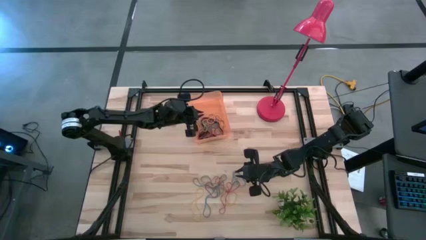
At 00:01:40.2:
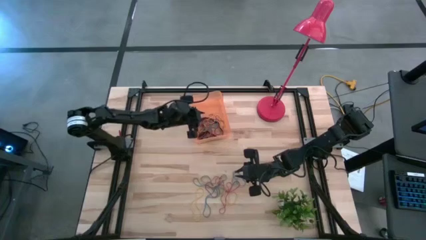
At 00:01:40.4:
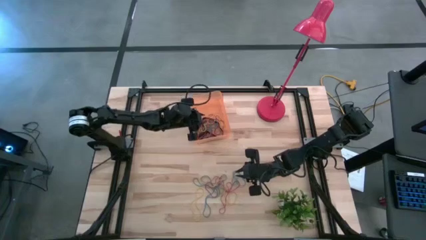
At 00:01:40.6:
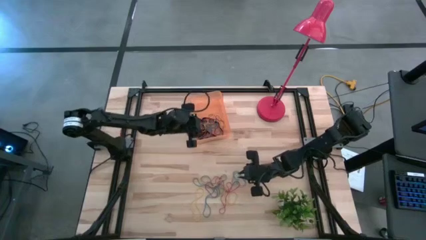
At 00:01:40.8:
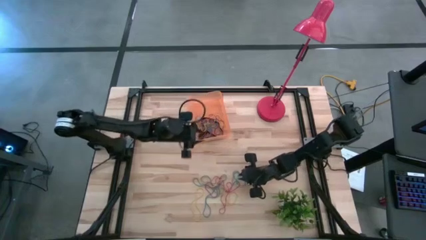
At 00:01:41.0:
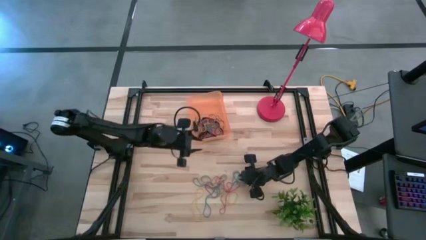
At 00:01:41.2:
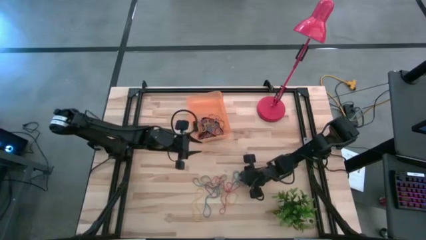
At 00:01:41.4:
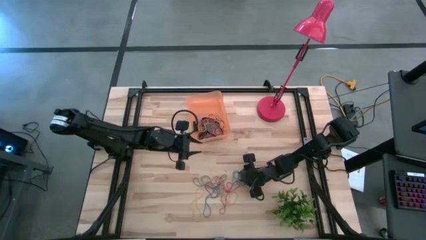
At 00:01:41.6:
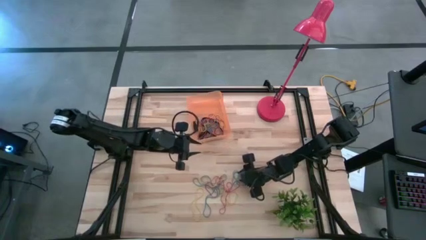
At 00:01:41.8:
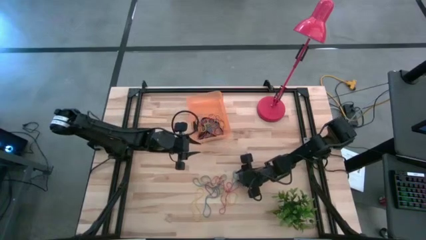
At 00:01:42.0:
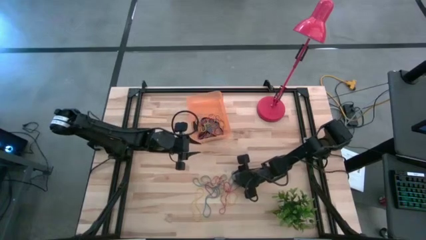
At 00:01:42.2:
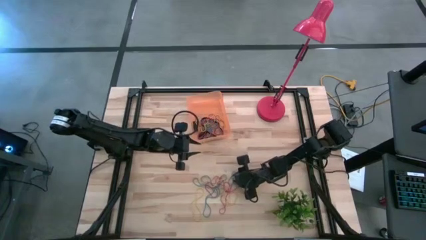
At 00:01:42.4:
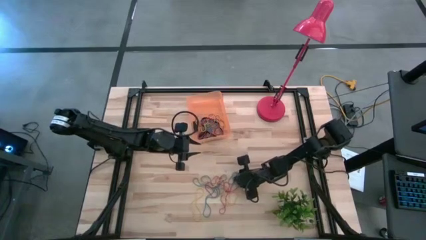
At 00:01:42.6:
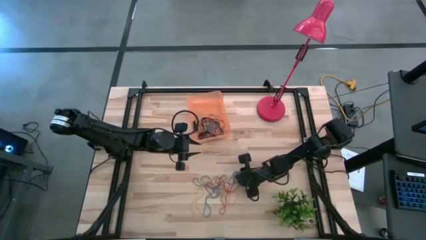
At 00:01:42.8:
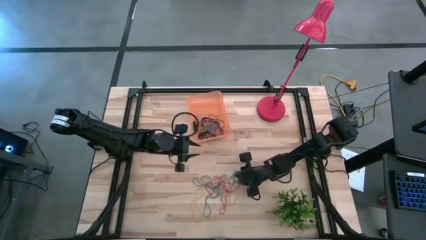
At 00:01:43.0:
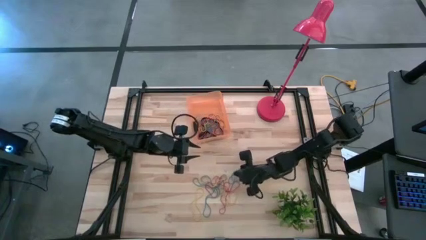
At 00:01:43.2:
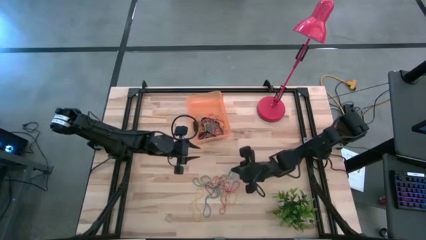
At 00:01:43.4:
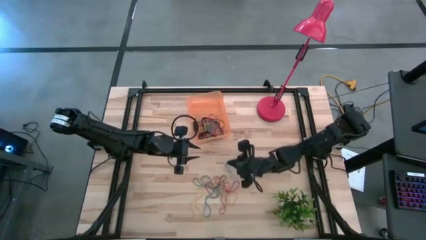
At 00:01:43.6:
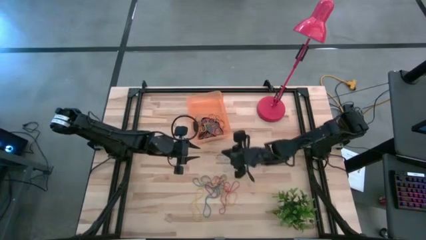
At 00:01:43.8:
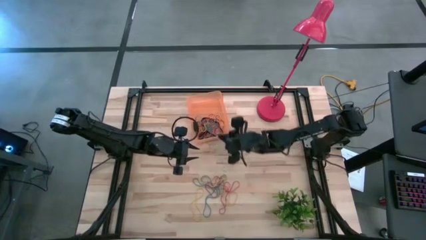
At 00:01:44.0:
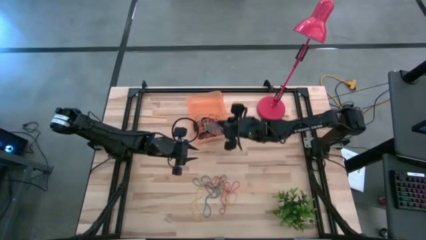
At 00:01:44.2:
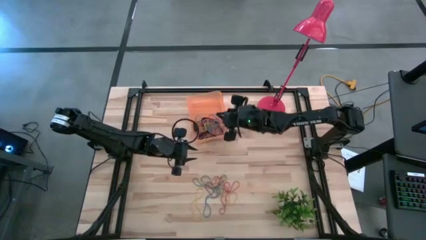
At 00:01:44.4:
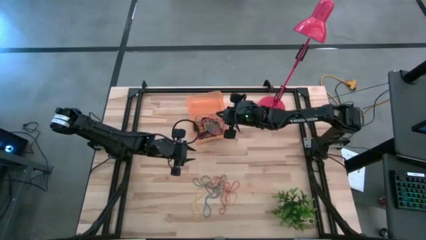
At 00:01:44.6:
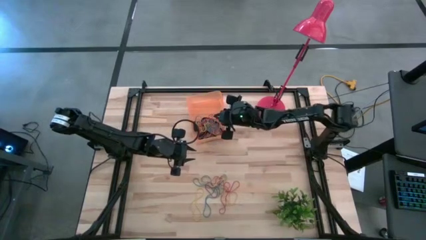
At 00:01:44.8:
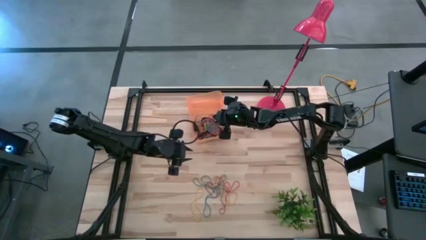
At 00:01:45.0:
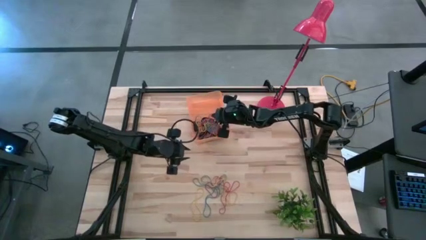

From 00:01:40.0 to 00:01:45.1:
Task: Pick and place rubber bands into bin
Put the blue rubber band into the orange bin

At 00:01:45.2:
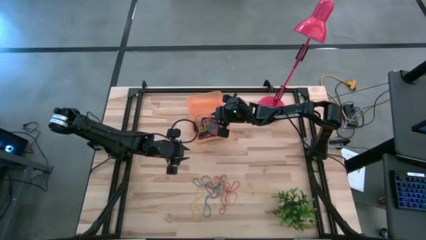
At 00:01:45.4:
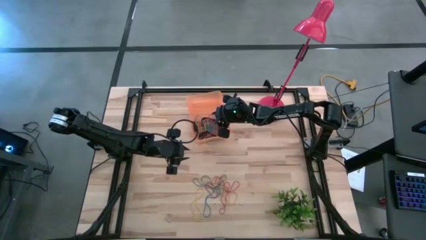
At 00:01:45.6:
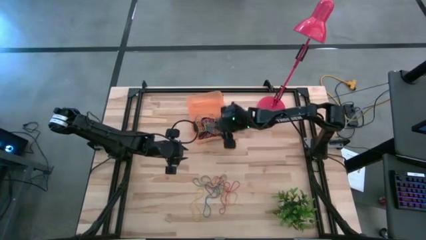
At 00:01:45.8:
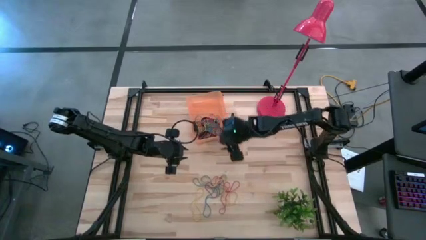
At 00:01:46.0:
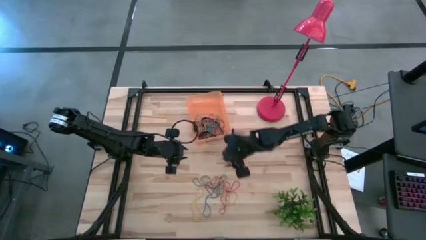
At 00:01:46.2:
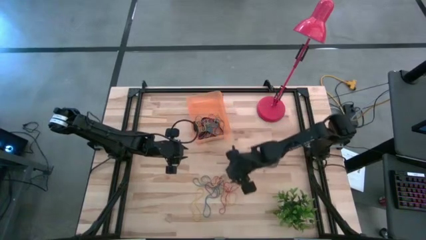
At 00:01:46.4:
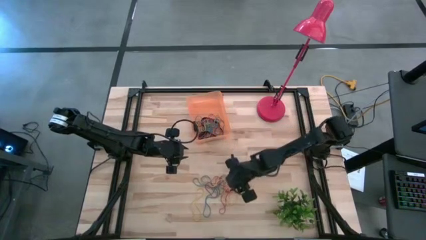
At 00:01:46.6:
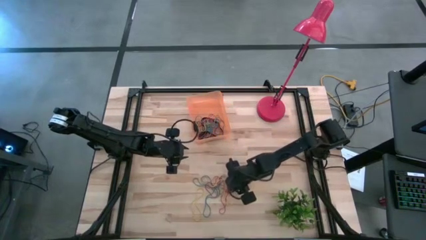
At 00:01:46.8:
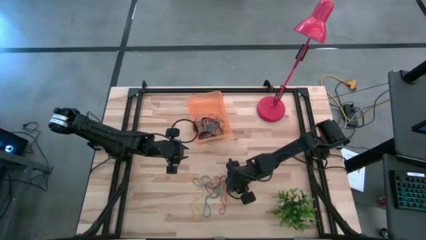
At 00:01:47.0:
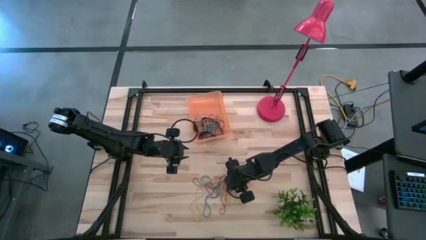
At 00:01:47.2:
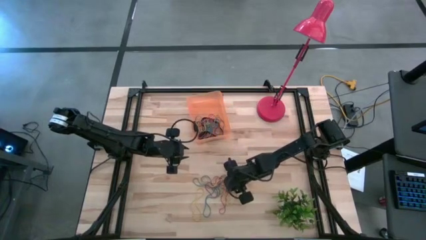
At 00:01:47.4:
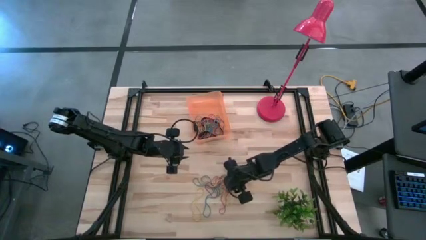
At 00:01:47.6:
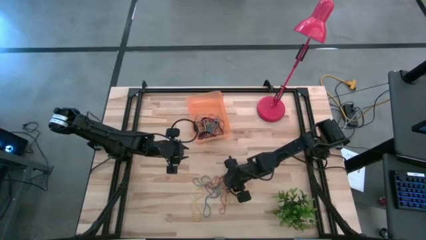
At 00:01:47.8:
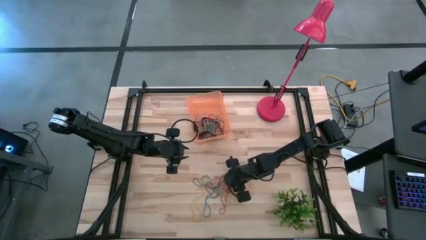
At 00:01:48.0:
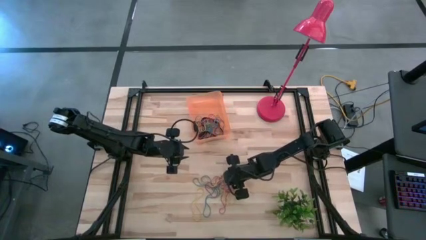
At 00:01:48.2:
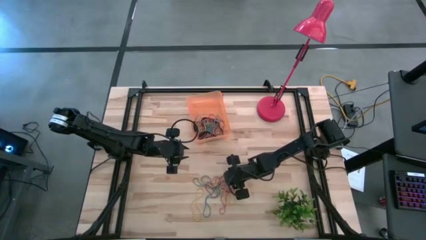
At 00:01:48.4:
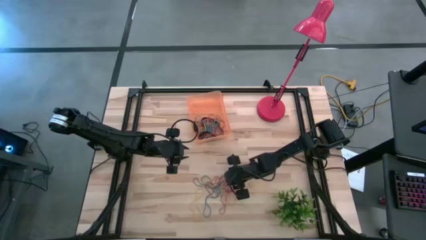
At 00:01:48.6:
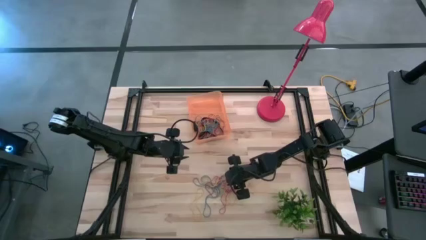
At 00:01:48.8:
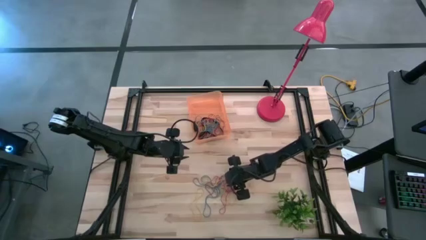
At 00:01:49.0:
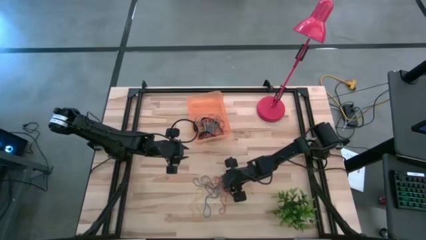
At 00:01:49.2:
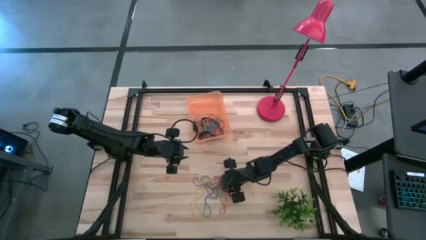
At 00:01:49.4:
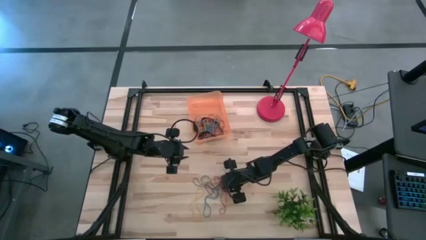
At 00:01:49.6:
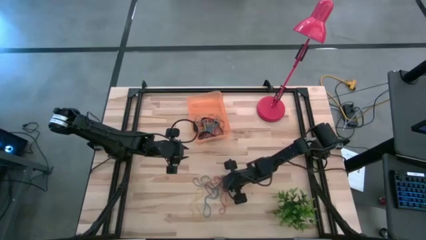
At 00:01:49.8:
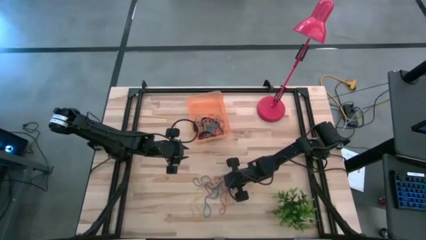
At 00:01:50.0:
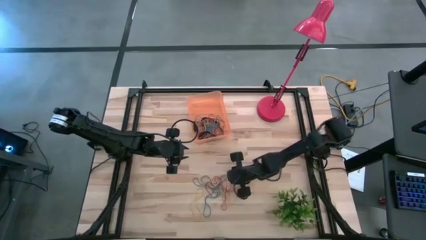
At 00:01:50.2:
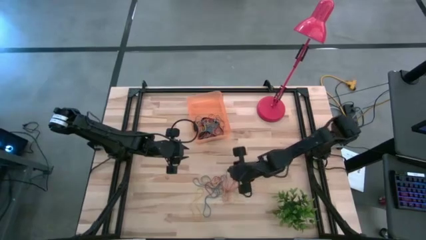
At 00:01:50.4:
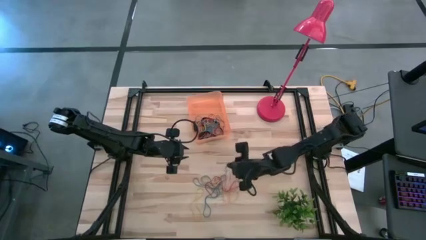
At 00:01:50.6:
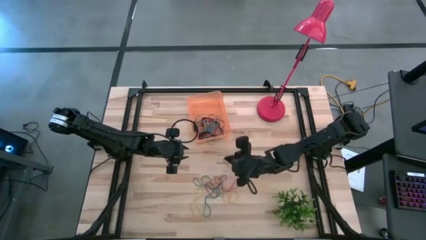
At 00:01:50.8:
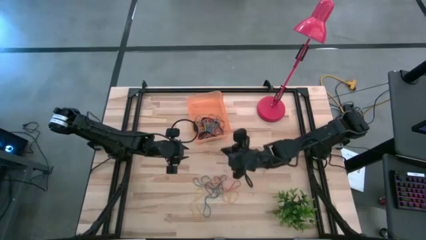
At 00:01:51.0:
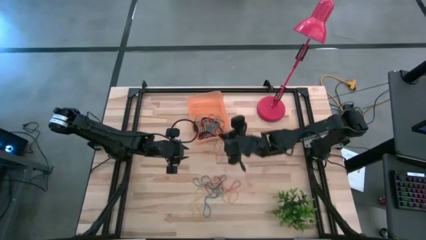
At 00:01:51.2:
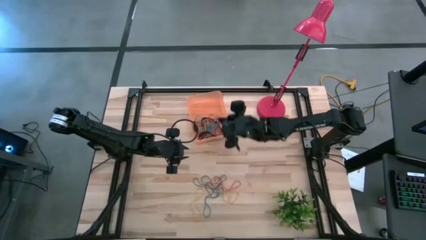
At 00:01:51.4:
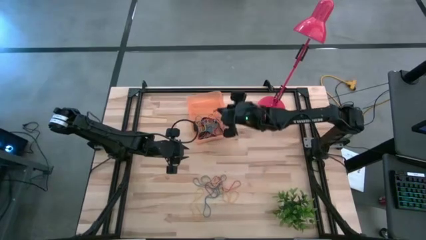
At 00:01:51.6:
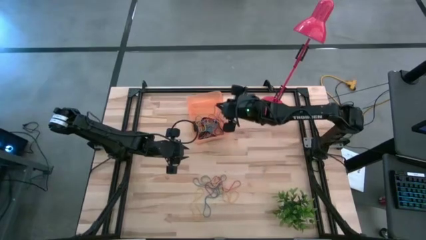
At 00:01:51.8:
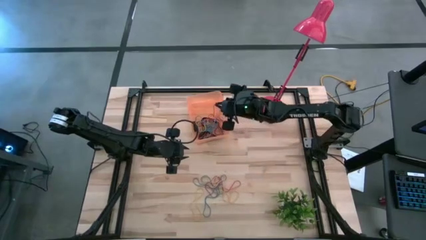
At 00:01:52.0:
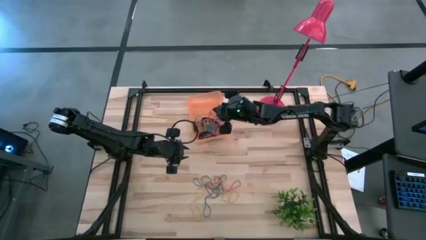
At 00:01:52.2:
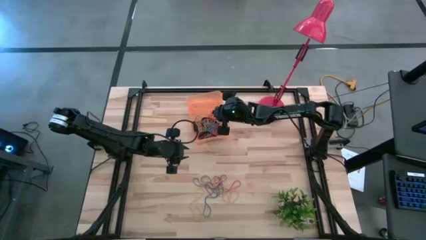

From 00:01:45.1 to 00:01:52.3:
Put the red rubber band into the orange bin

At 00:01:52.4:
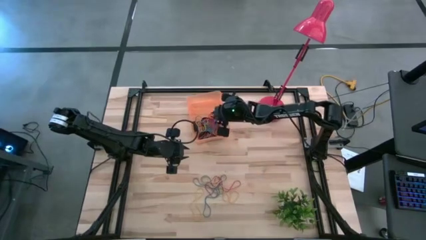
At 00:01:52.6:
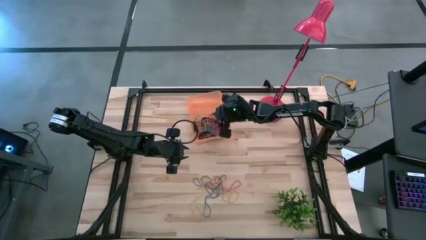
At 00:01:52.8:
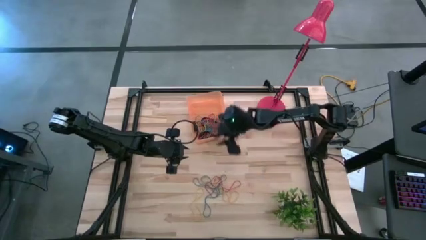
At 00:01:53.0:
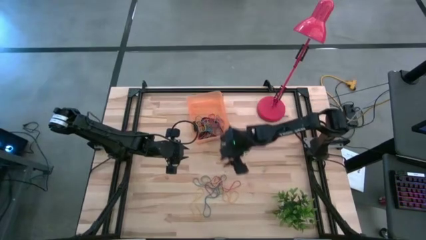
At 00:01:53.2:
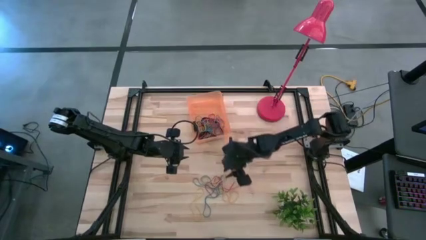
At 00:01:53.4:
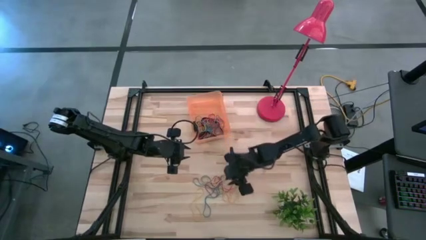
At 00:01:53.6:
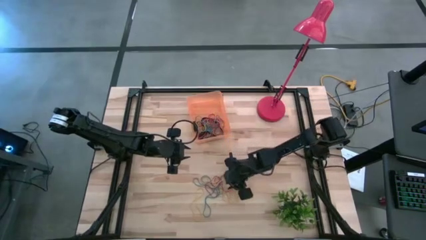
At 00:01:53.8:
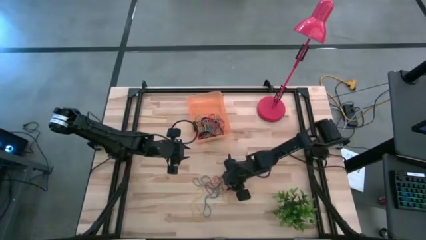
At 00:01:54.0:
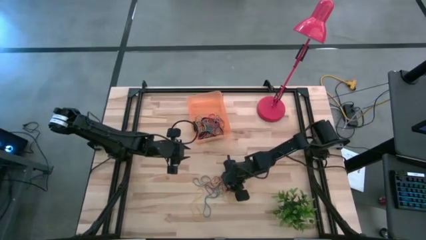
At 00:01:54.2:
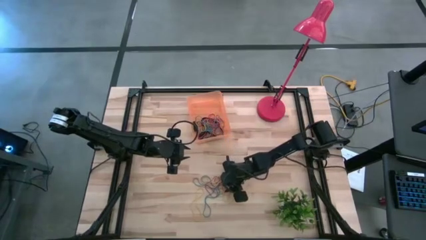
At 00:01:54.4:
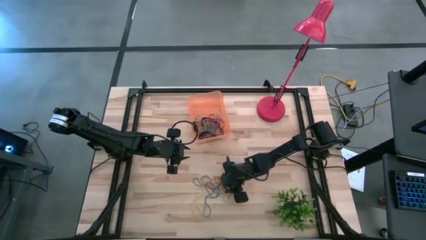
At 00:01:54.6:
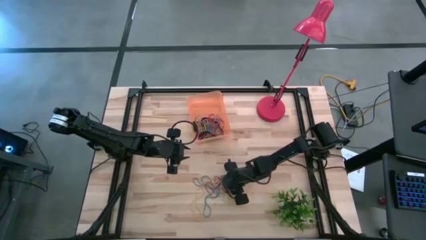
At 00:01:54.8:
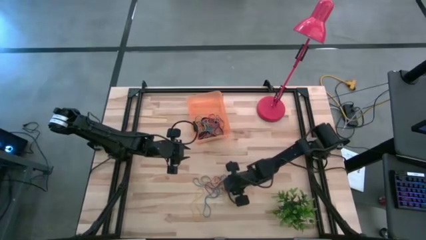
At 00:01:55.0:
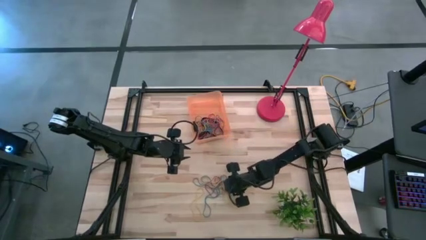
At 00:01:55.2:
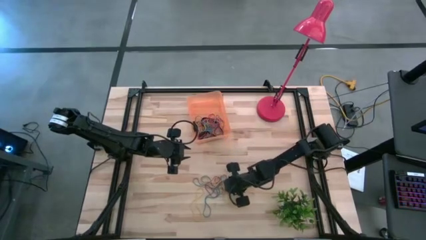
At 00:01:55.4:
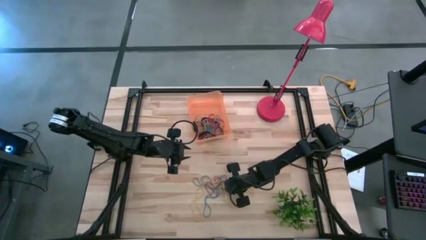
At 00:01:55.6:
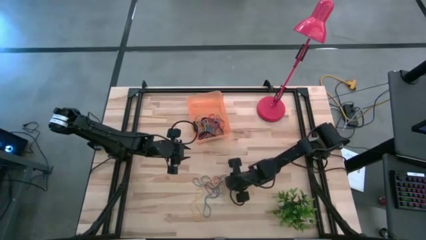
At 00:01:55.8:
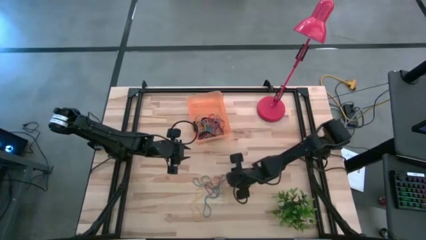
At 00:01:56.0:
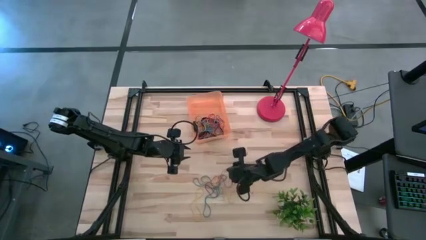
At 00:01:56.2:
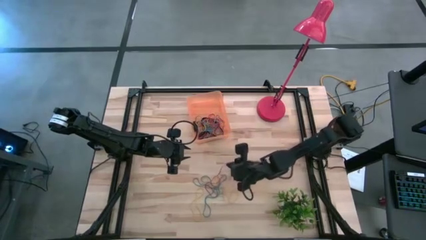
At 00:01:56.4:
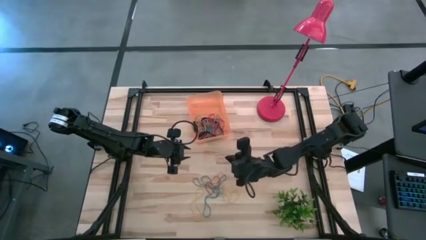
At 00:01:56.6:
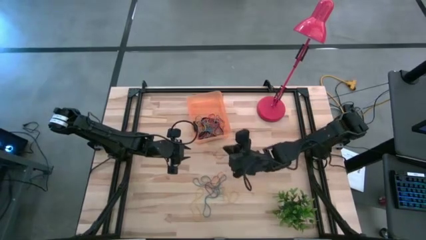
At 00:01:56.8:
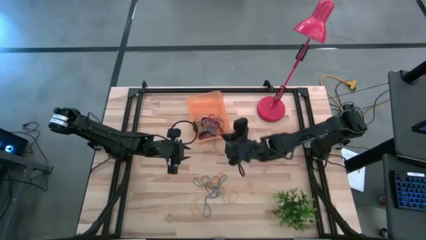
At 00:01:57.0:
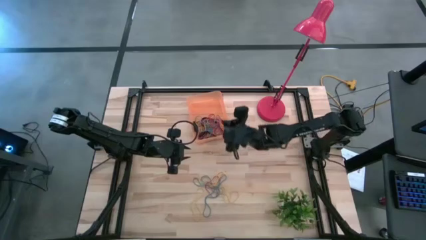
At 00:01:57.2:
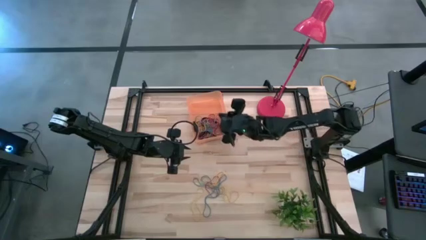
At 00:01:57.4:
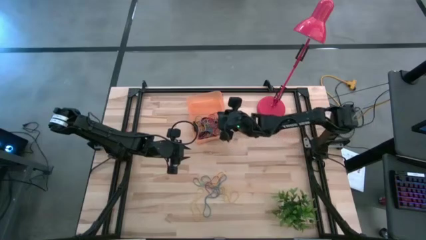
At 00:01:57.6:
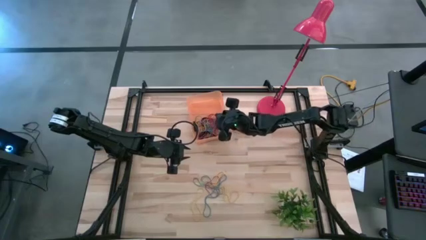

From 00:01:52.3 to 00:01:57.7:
Put the red rubber band into the orange bin
